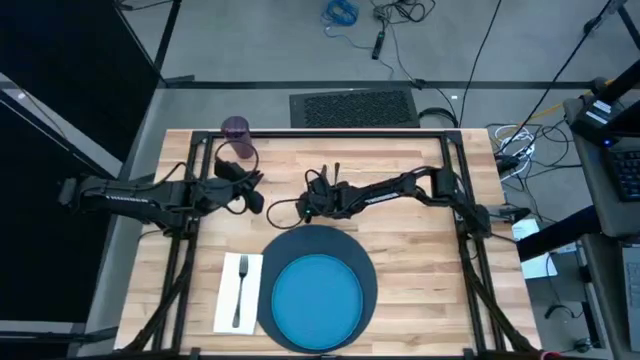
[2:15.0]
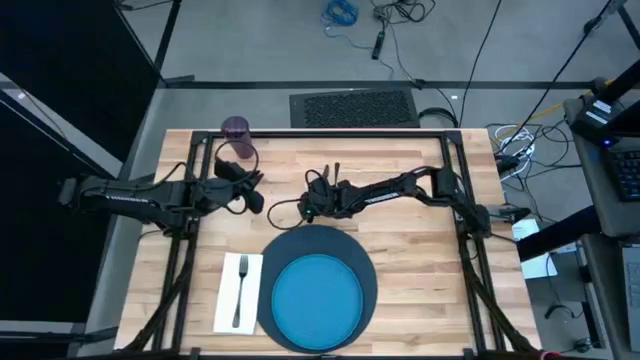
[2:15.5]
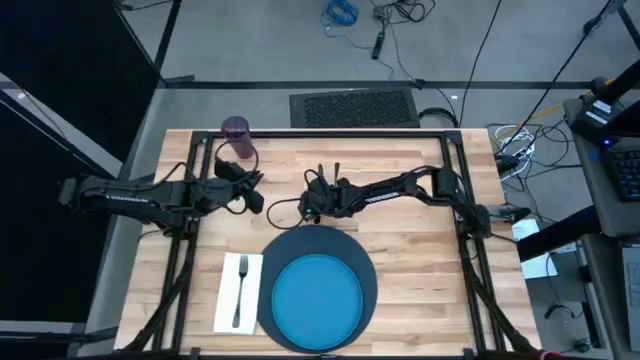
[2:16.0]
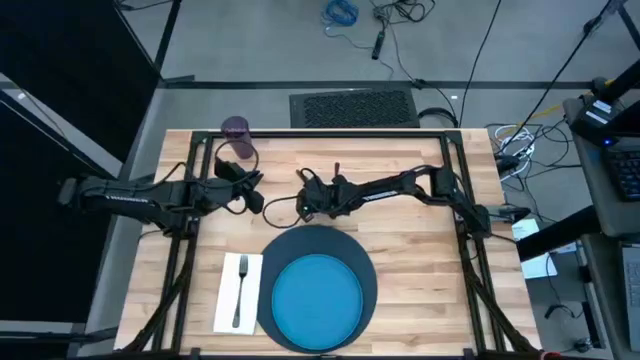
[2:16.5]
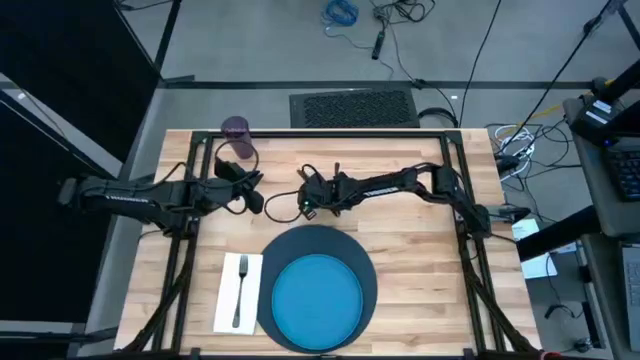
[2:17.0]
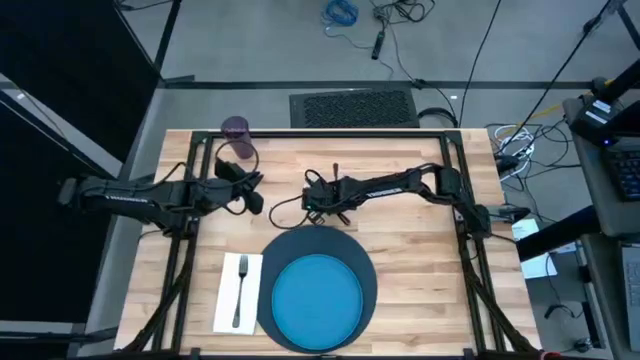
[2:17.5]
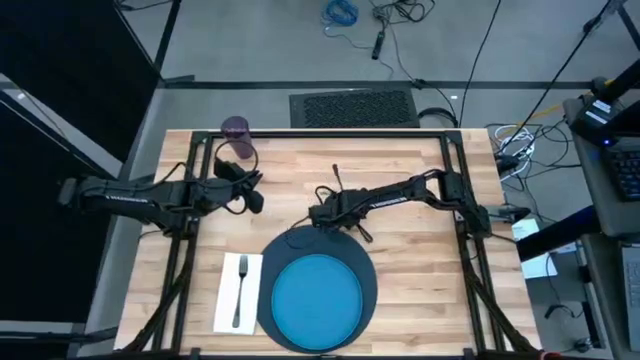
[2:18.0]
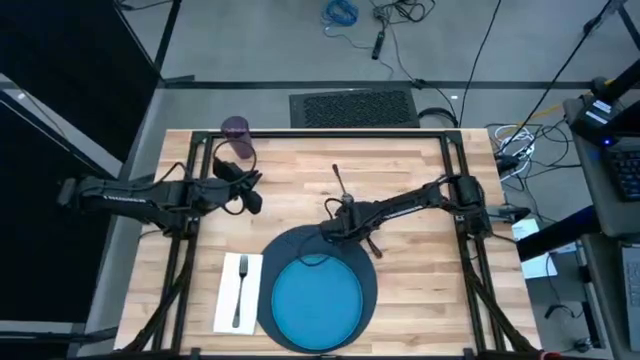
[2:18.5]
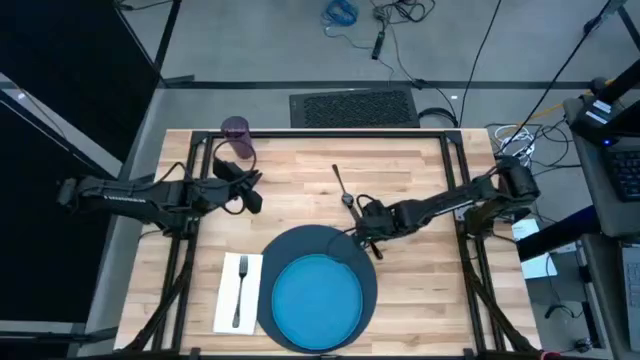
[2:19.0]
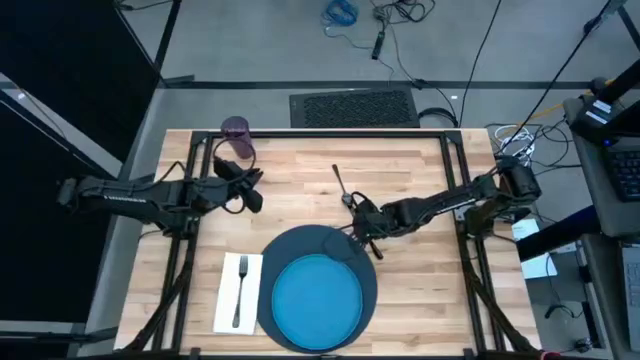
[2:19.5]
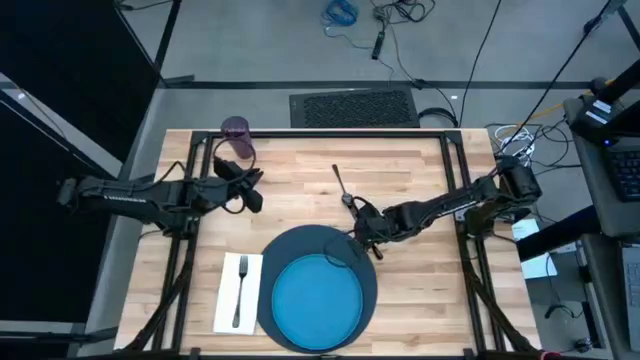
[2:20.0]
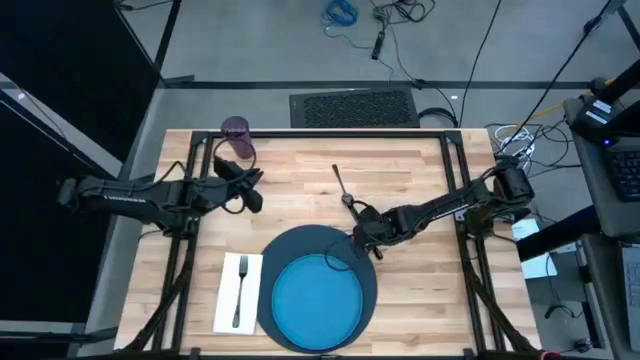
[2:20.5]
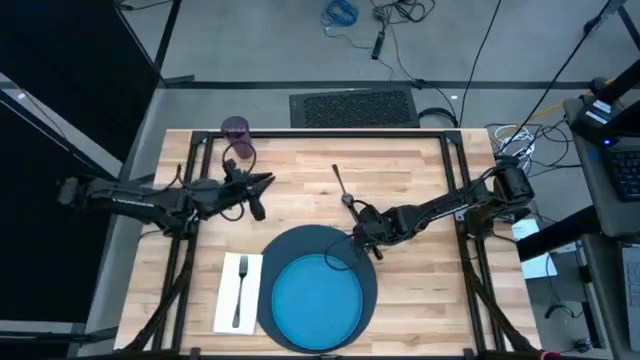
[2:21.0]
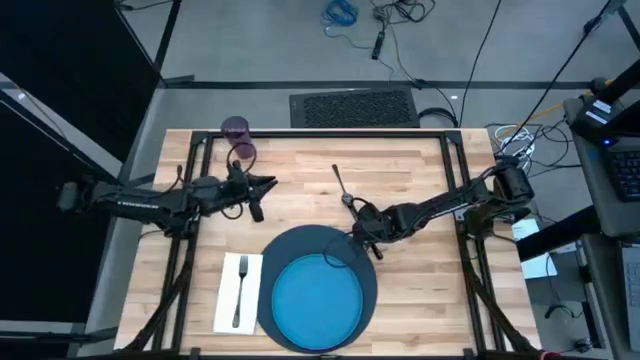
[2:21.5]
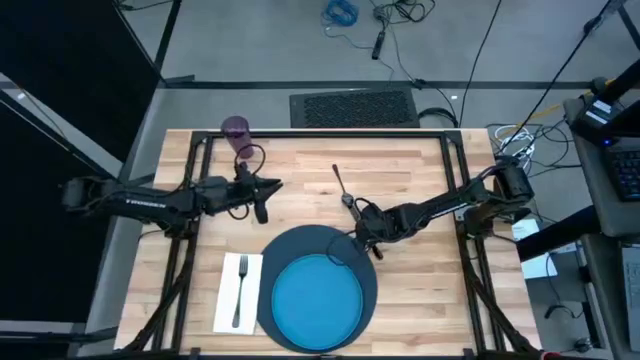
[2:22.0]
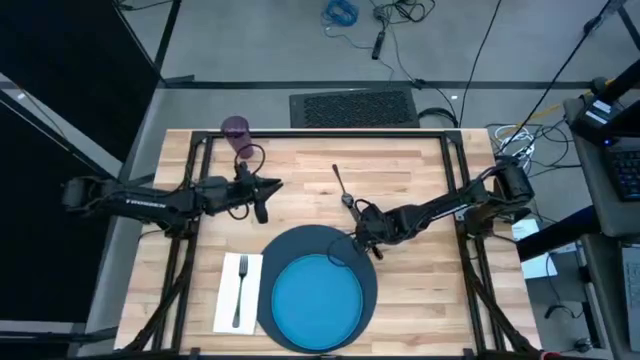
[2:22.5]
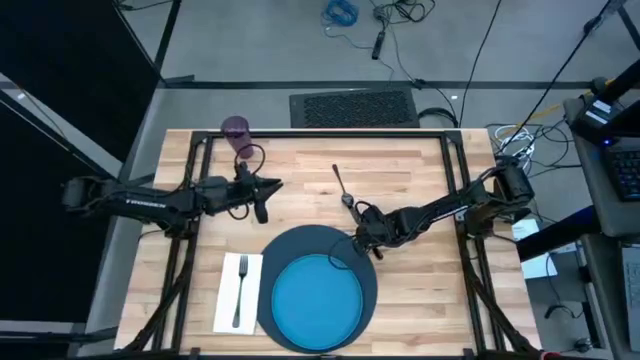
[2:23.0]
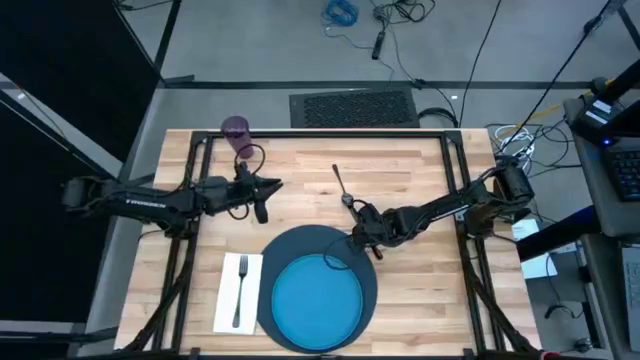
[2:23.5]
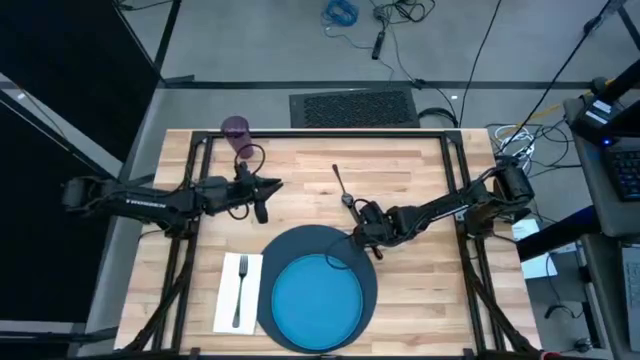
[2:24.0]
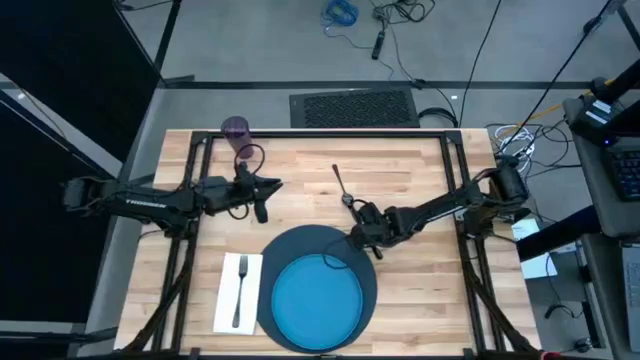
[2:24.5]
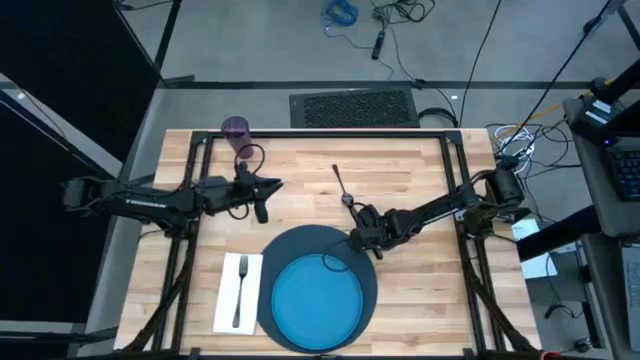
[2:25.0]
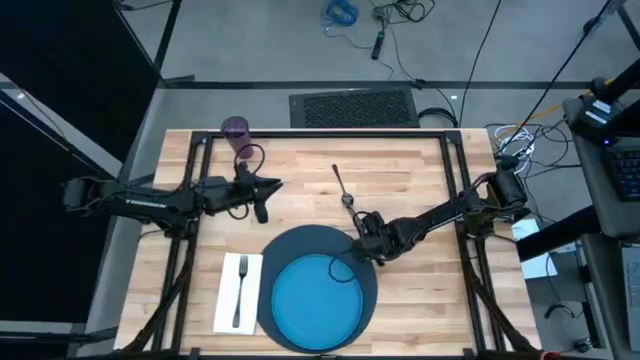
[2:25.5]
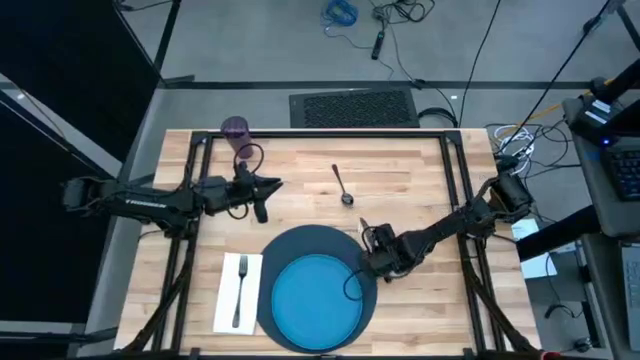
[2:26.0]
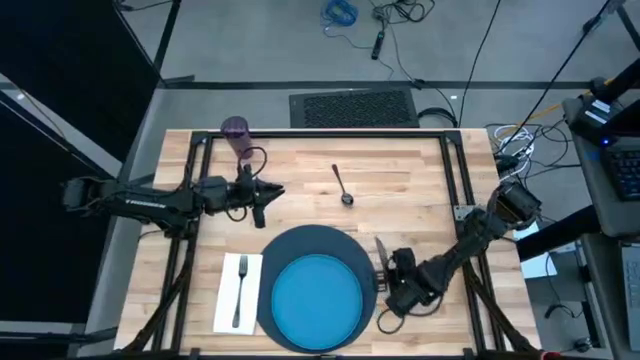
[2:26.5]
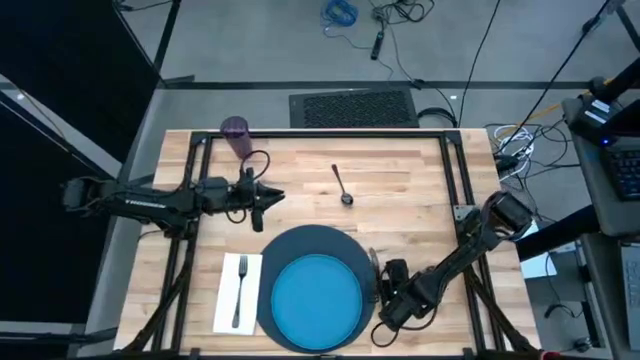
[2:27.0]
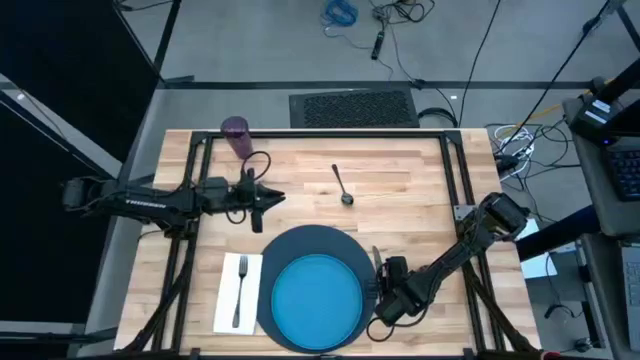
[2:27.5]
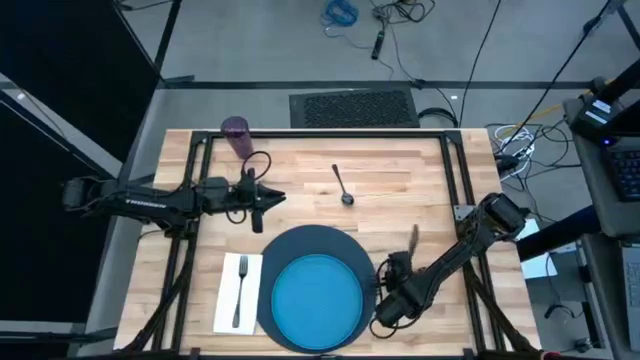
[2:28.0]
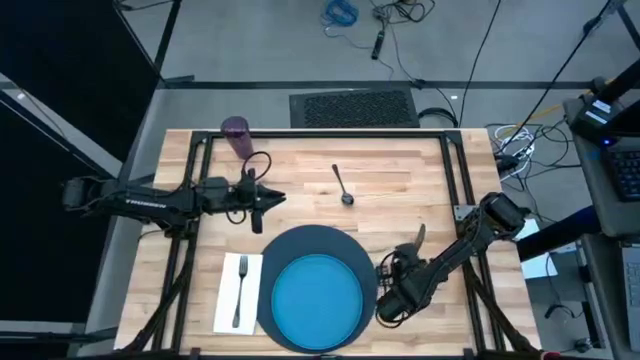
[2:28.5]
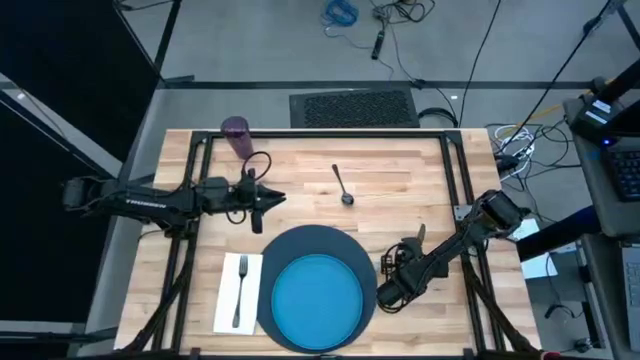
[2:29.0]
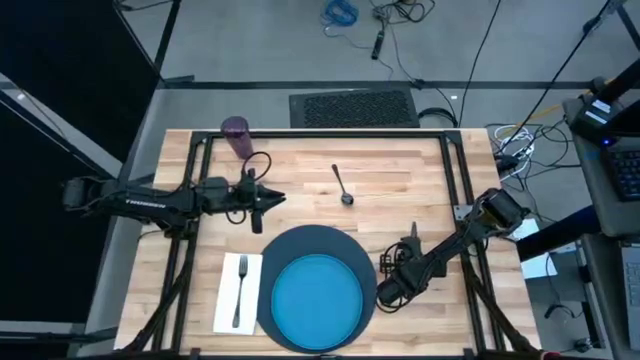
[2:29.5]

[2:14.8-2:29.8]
Task: Set table place
Move the silver knife to the middle right of the table

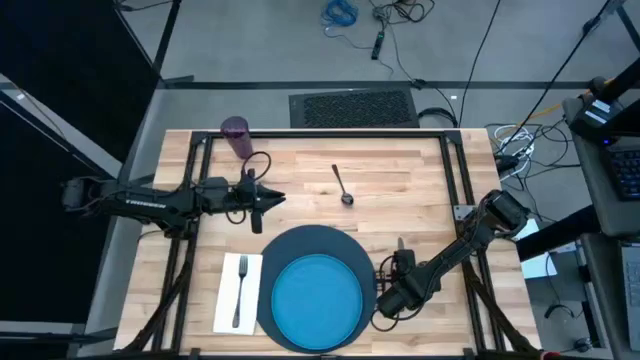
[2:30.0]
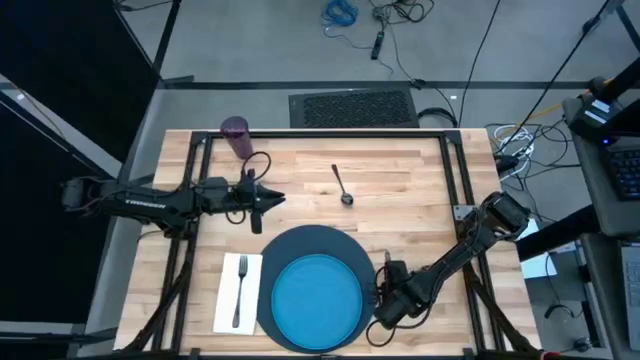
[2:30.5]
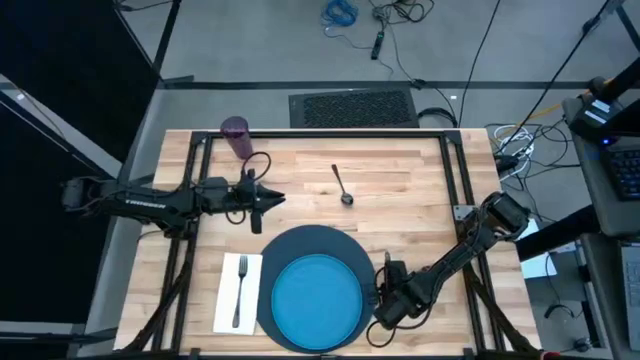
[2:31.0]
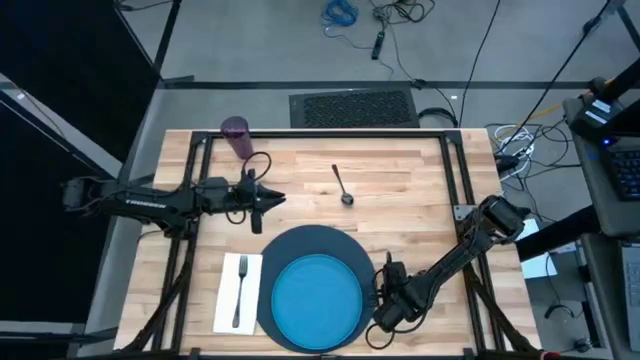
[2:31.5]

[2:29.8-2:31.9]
Move the silver knife to the middle right of the table
